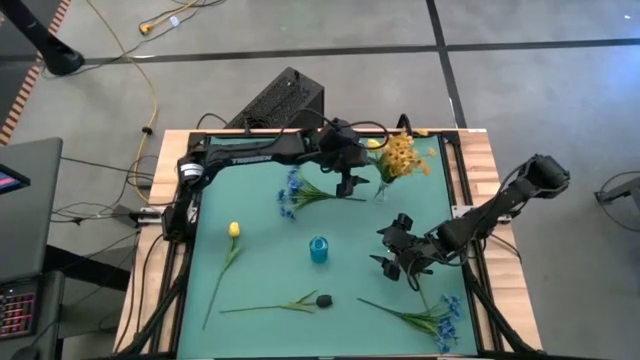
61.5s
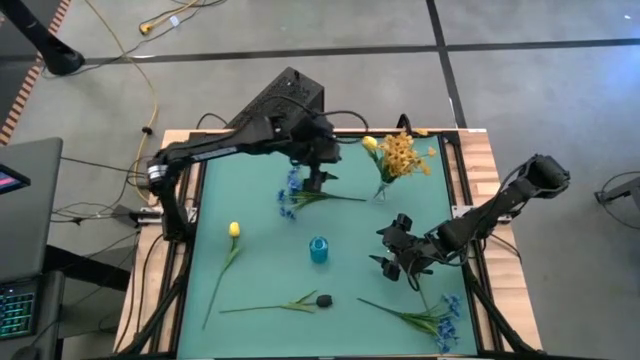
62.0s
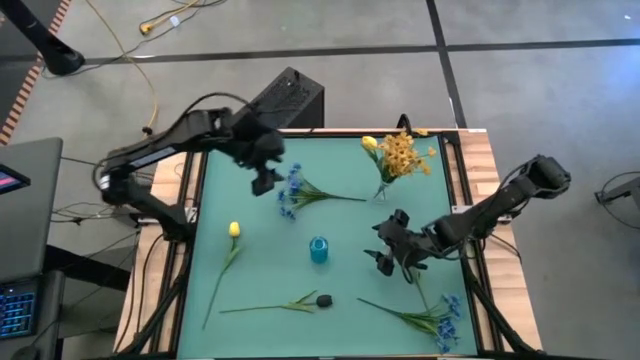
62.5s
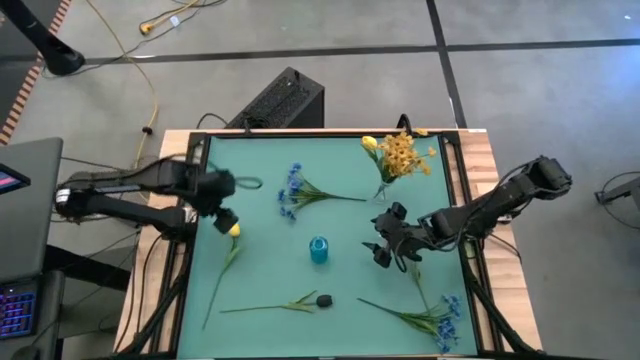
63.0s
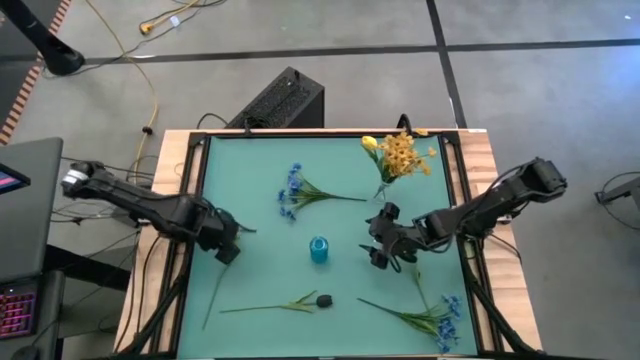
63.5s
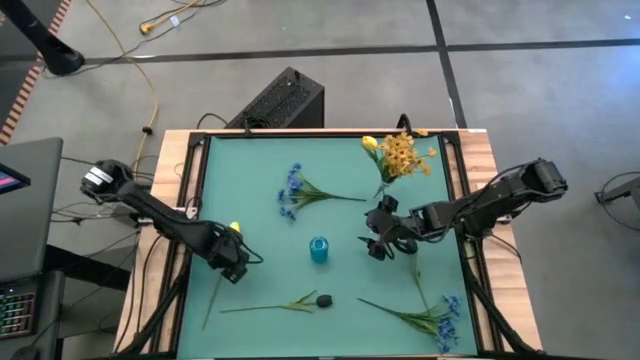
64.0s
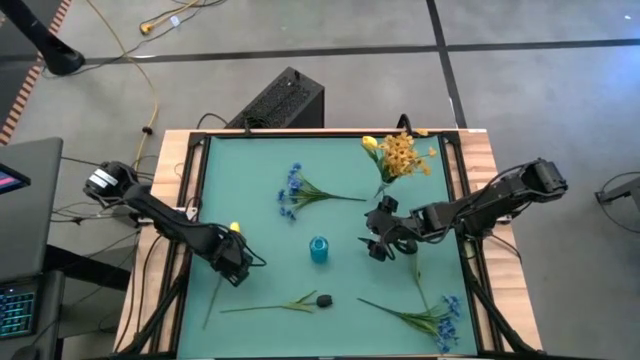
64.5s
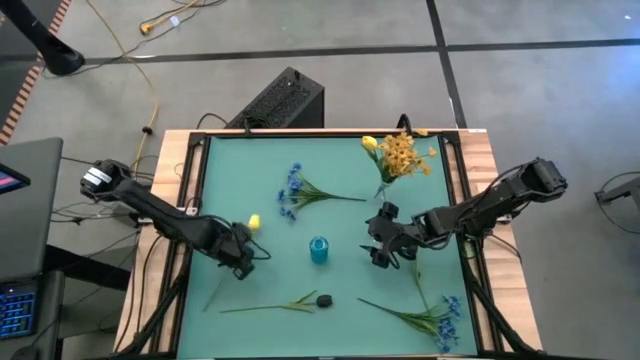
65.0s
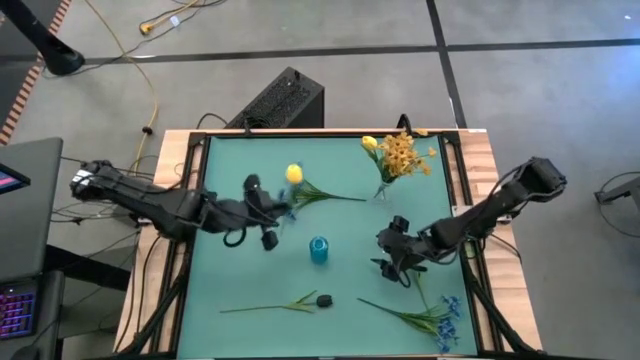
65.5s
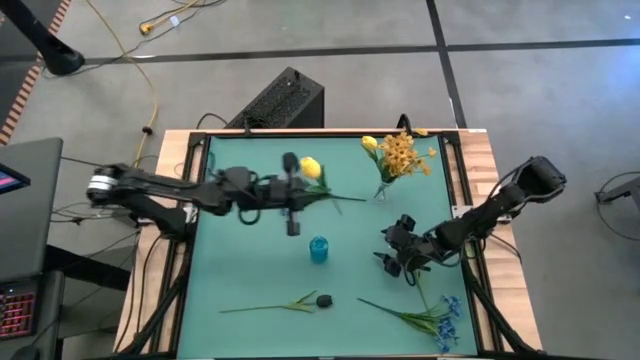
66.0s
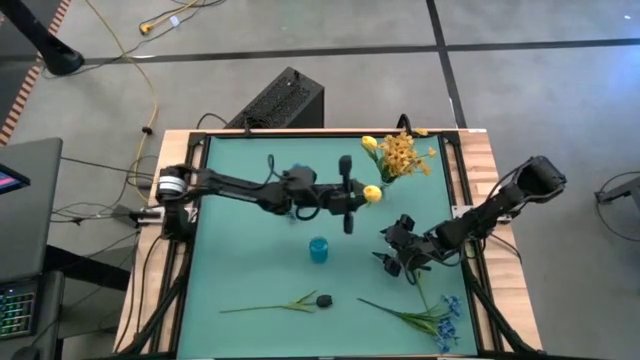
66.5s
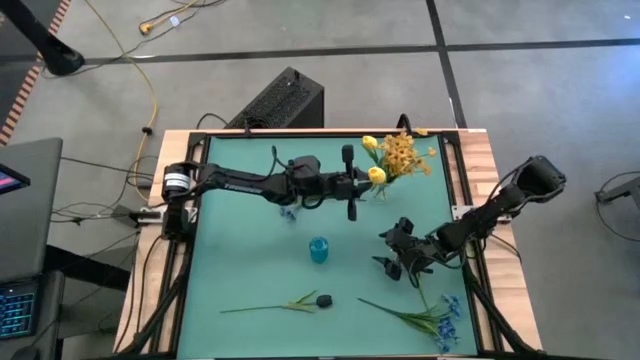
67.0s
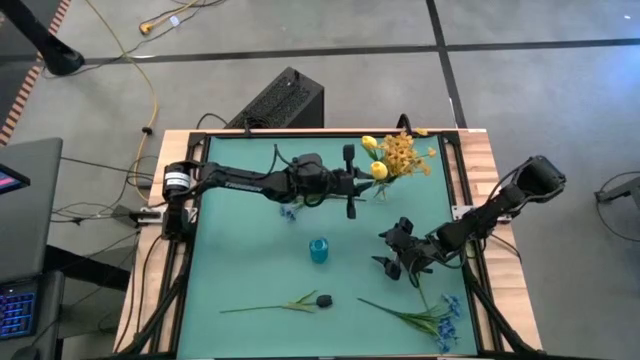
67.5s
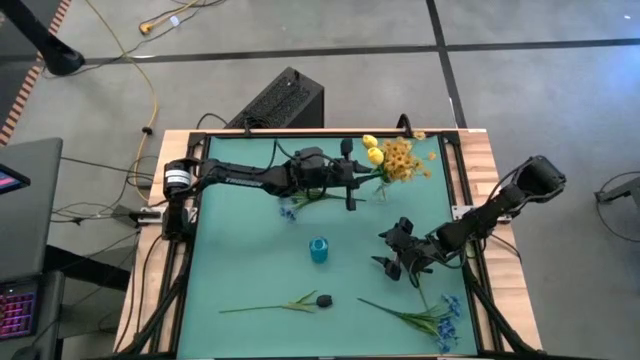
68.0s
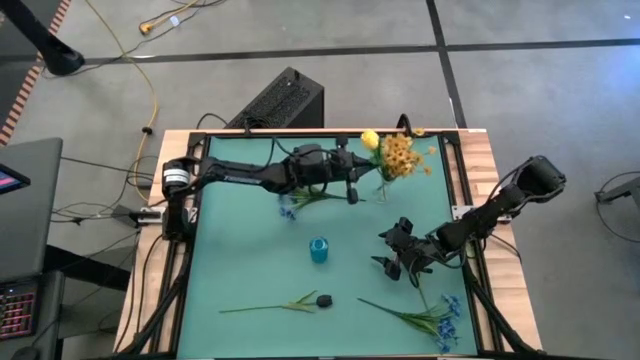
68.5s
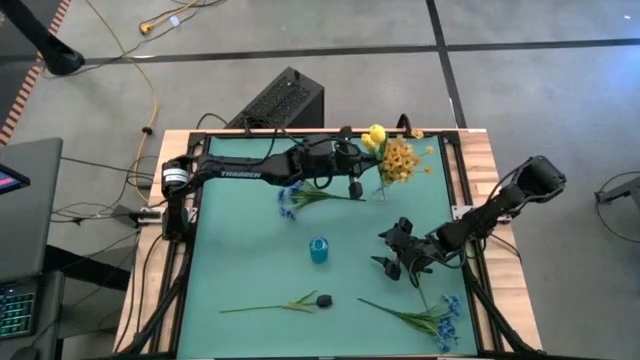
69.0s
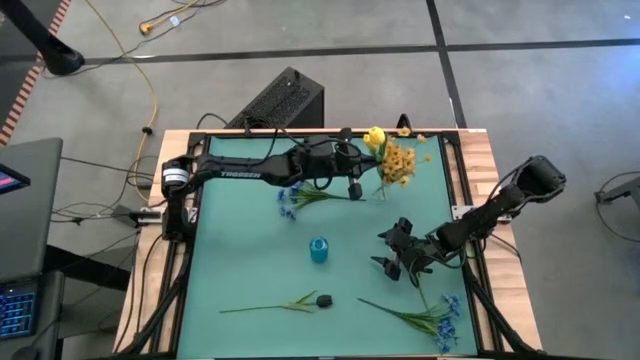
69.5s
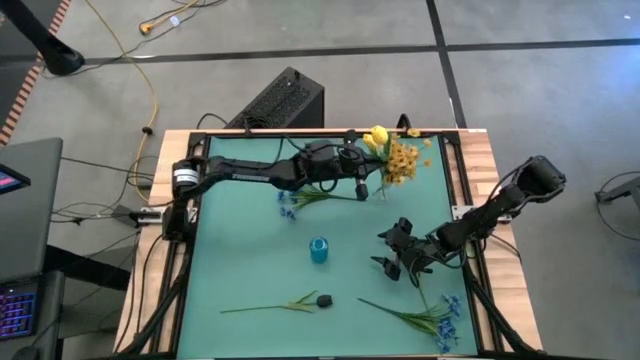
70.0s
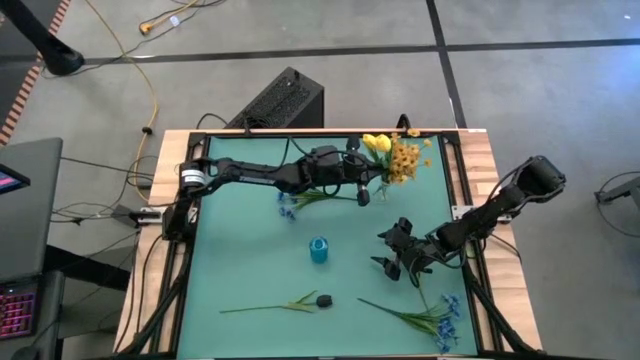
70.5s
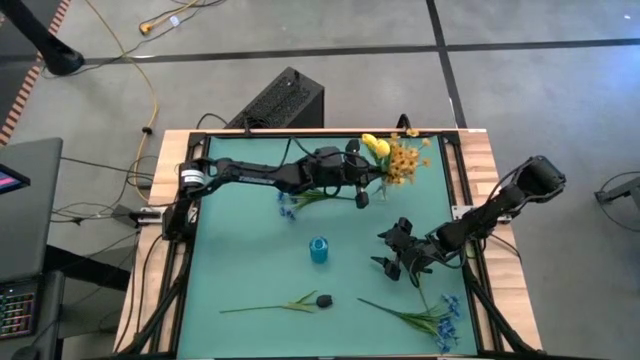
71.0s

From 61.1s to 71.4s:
Task: Sort flowers into vase by color
Put the yellow tulip into the transparent vase

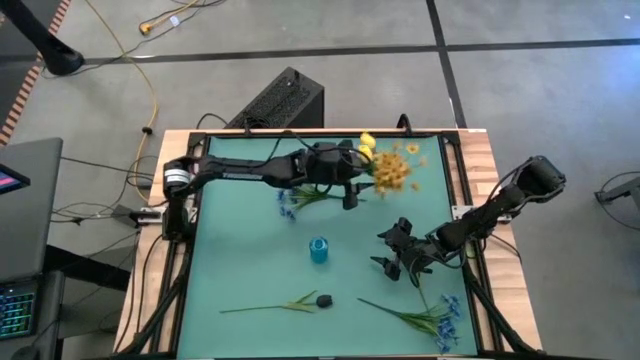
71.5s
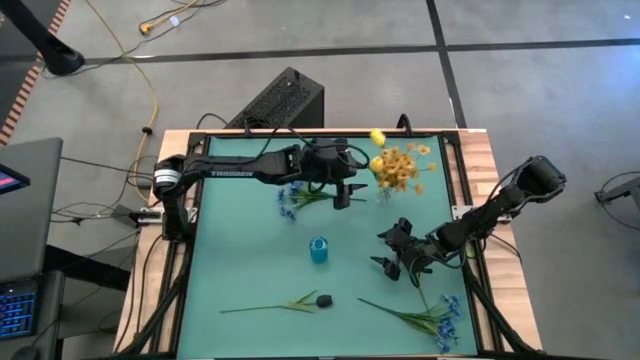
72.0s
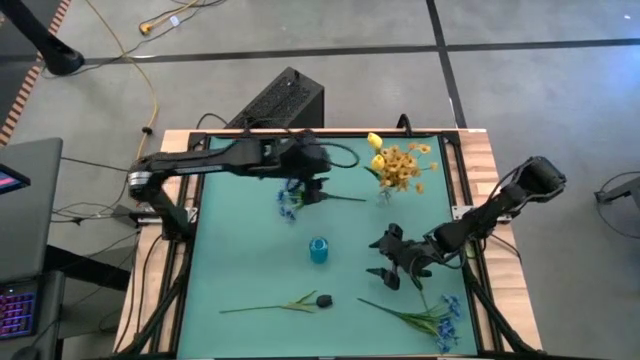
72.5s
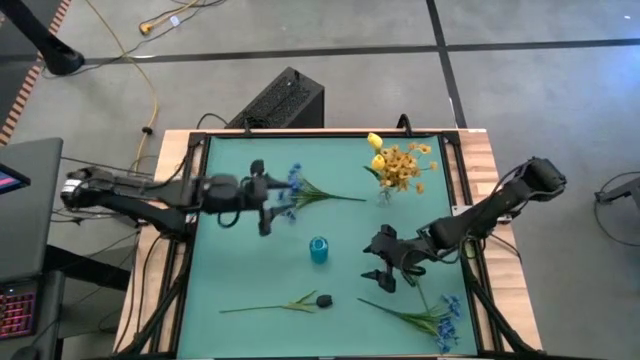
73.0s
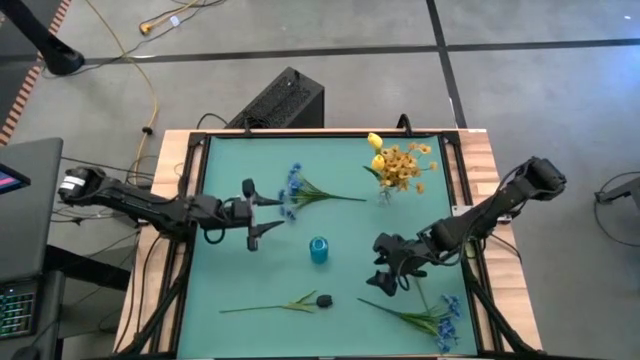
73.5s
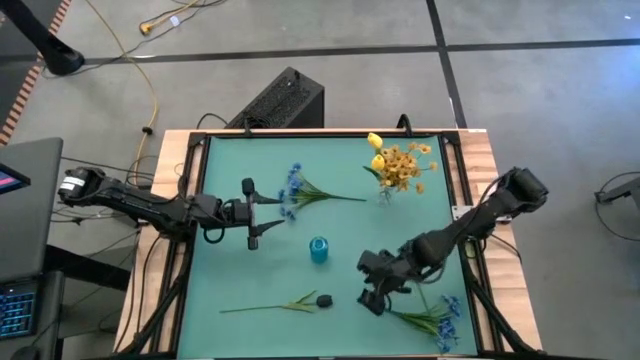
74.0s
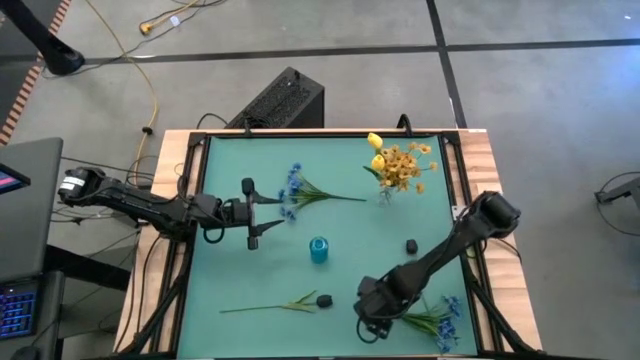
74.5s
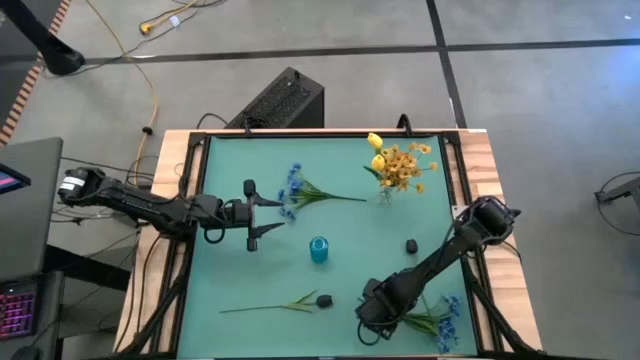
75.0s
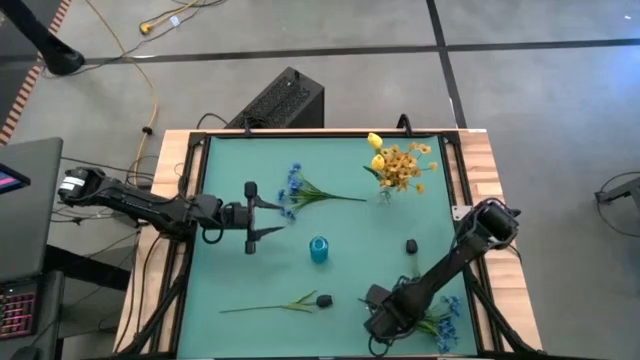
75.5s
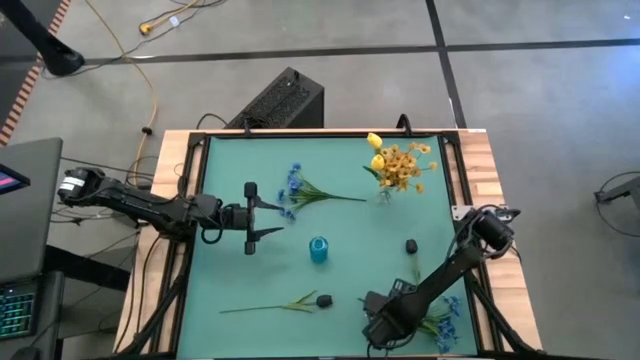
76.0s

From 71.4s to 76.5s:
Put the bottom blue flower into the blue transparent vase

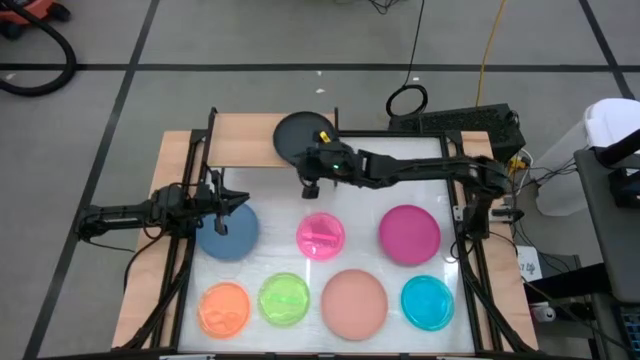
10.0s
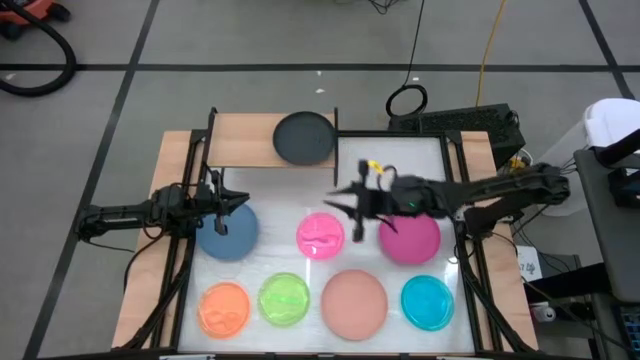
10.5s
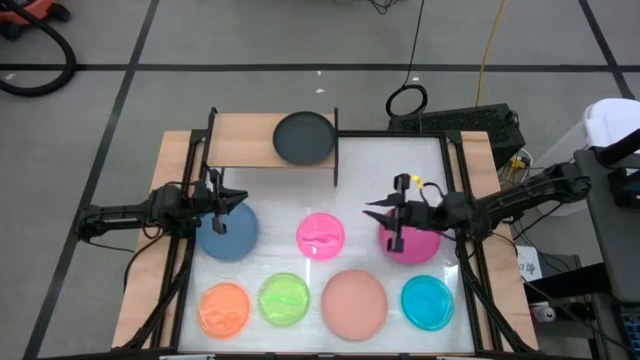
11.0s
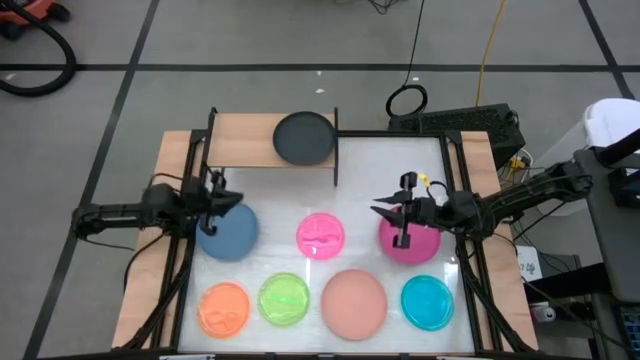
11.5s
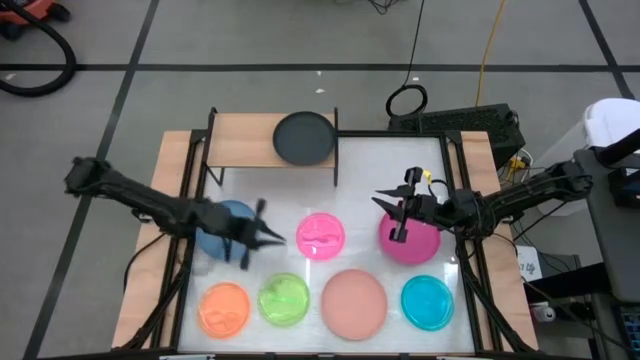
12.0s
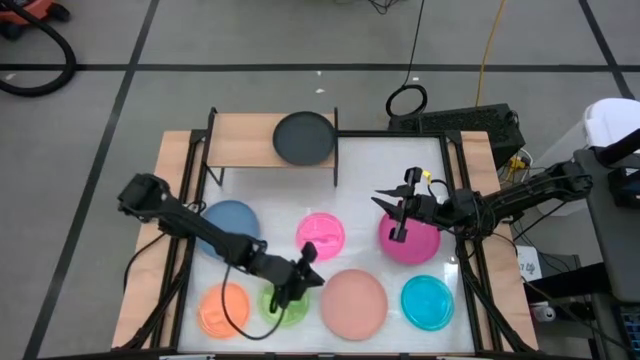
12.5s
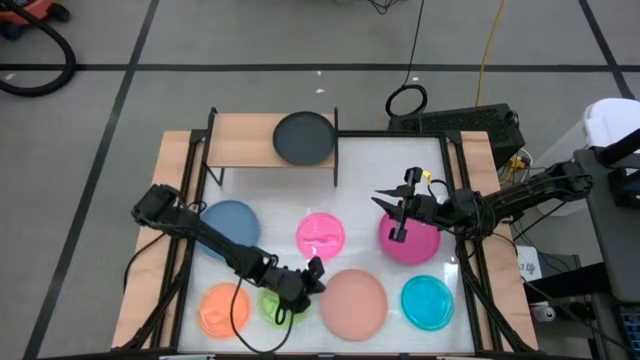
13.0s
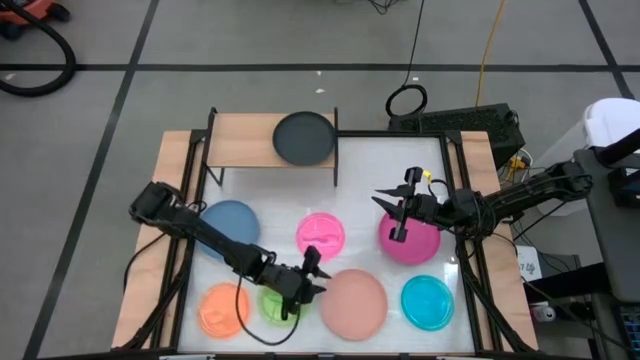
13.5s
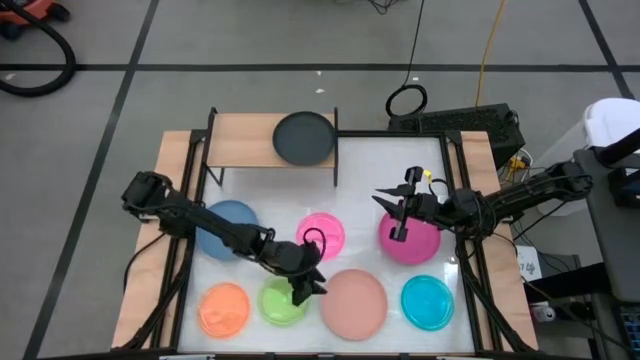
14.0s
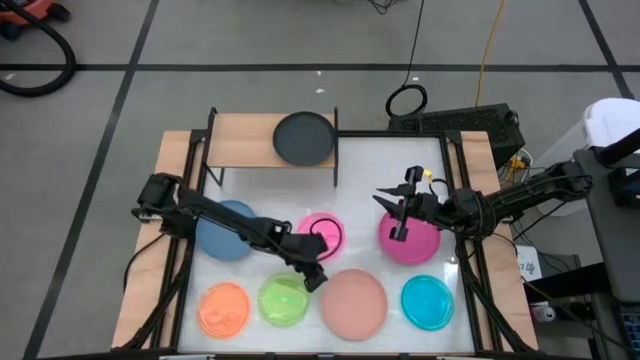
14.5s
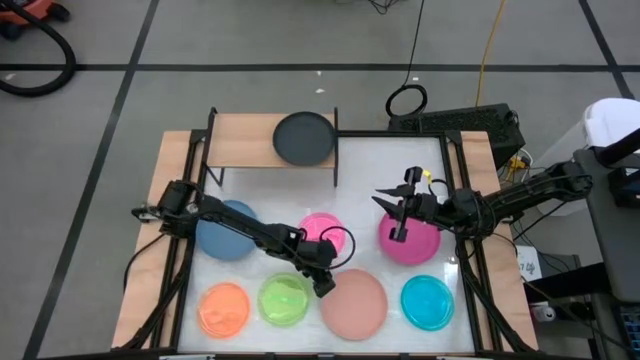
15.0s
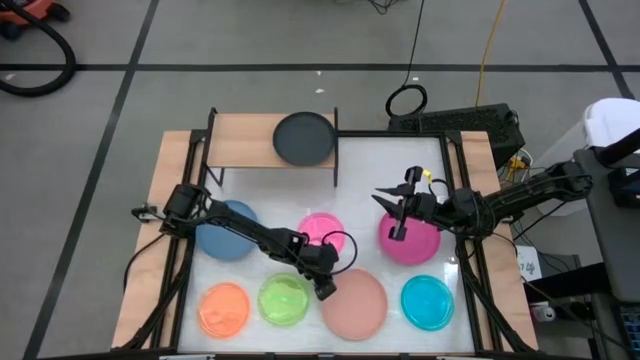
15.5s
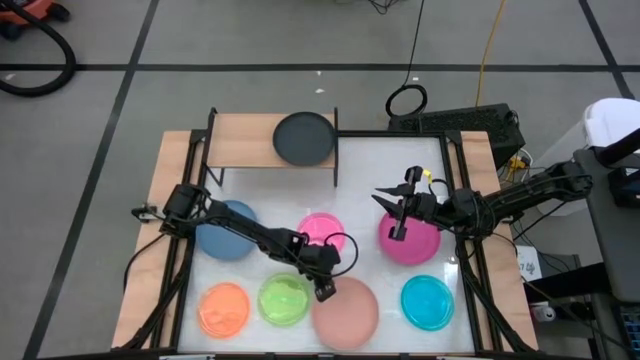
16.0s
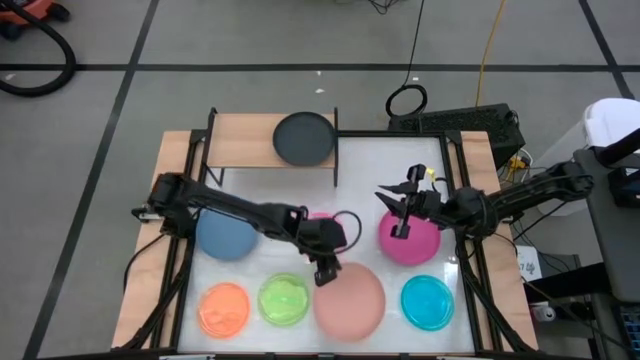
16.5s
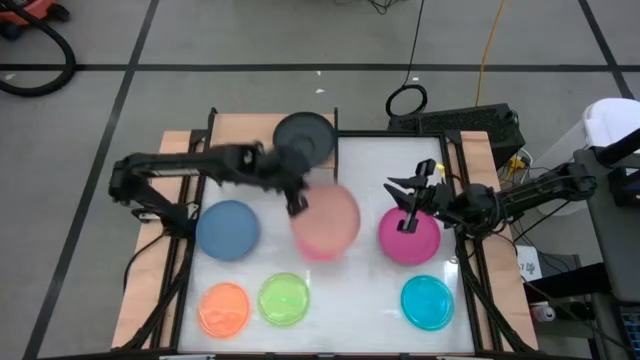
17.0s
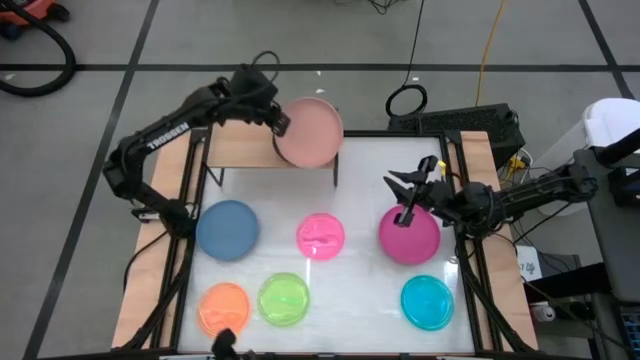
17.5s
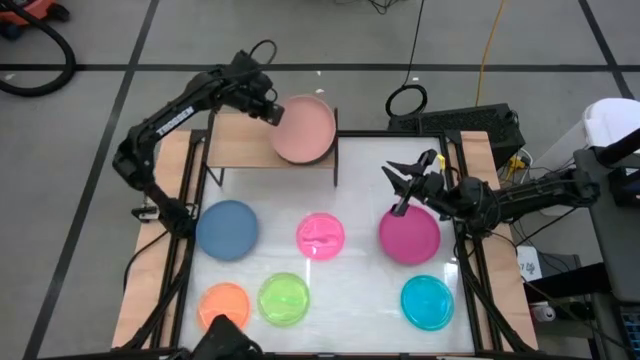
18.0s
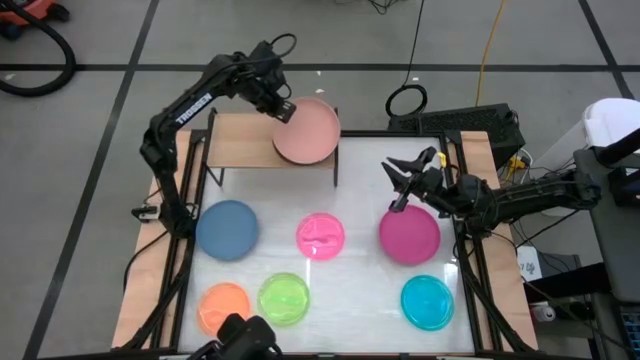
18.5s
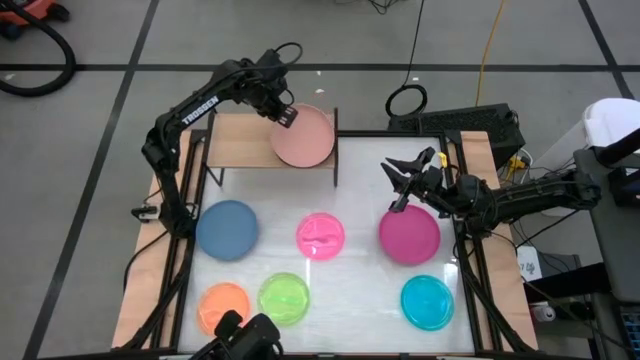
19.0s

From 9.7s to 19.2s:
Task: Place and stack plates onto a shelf
Stack the peach plate on top of the black plate on the shelf
